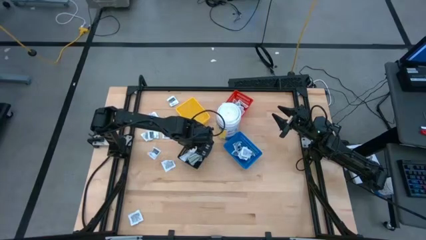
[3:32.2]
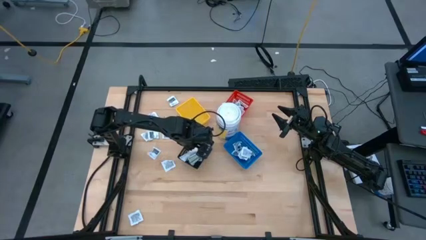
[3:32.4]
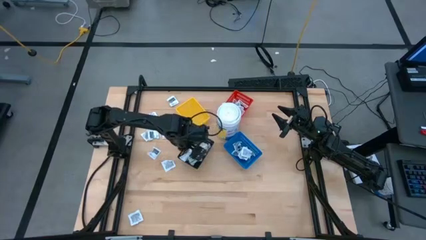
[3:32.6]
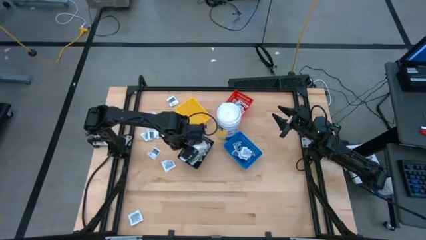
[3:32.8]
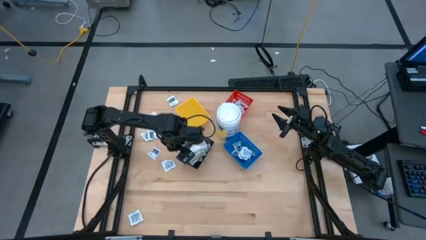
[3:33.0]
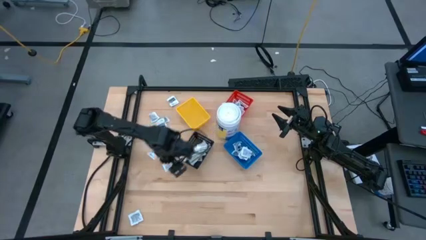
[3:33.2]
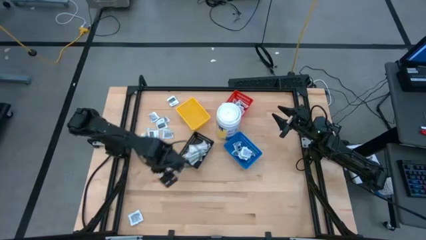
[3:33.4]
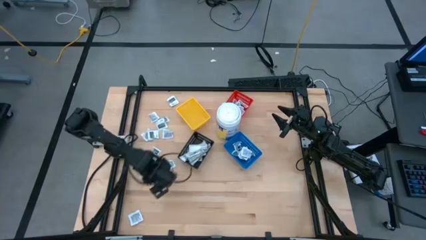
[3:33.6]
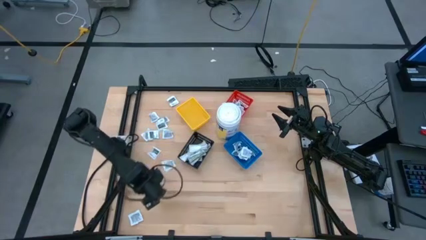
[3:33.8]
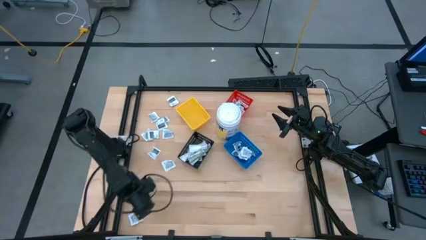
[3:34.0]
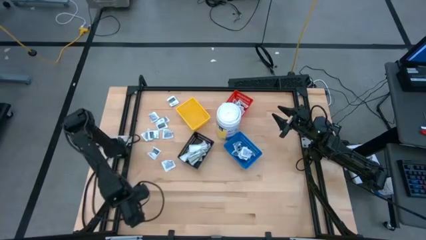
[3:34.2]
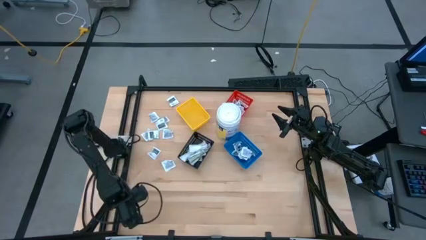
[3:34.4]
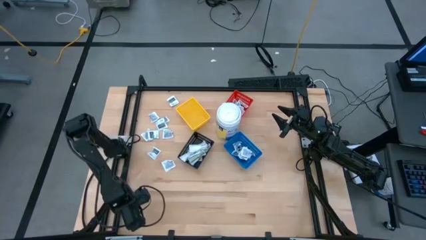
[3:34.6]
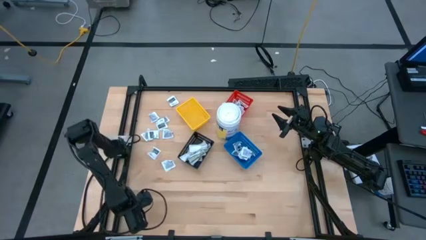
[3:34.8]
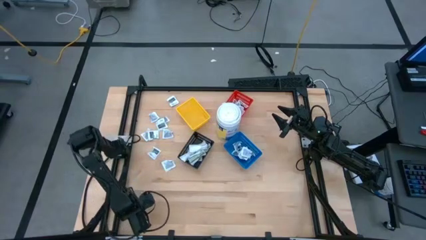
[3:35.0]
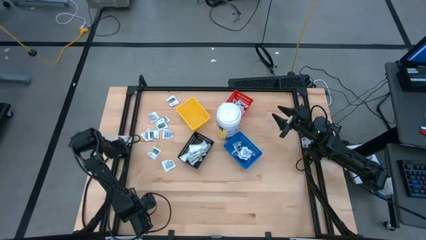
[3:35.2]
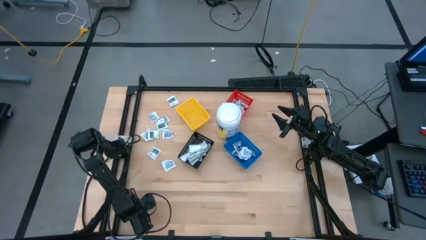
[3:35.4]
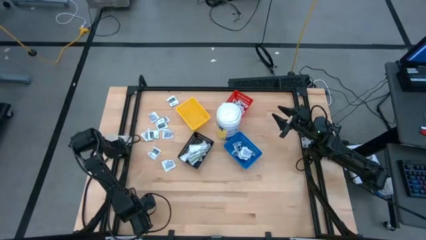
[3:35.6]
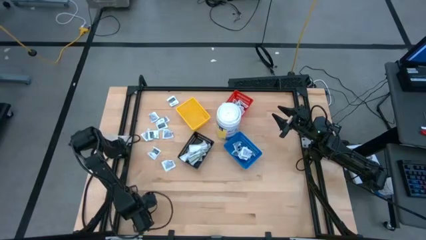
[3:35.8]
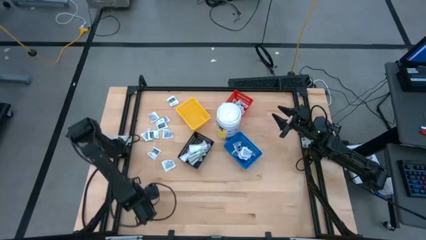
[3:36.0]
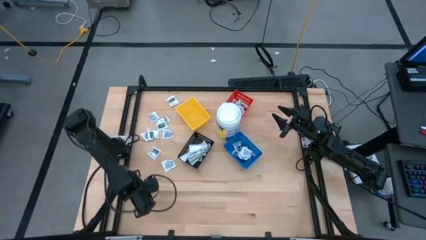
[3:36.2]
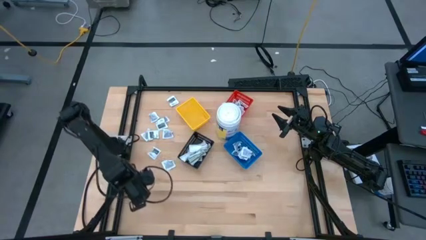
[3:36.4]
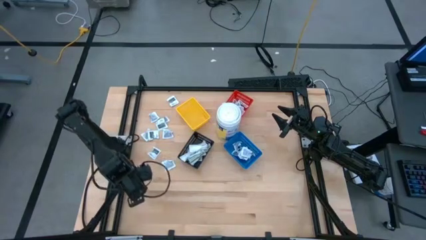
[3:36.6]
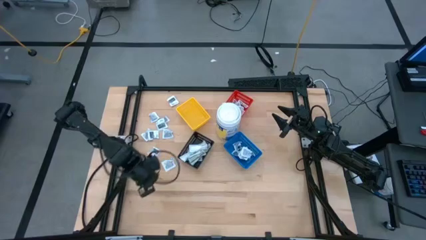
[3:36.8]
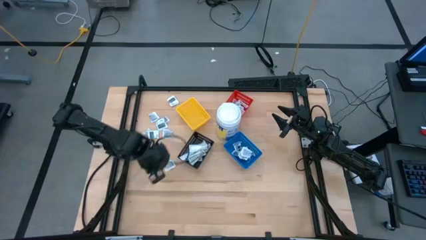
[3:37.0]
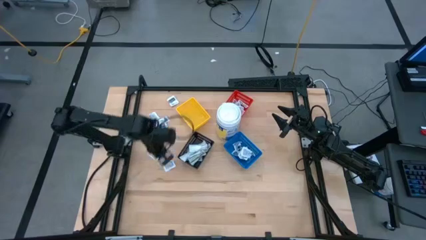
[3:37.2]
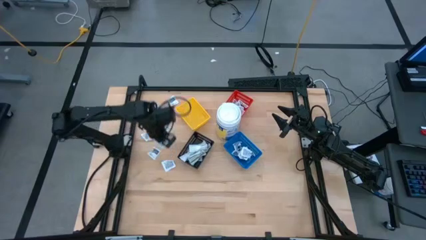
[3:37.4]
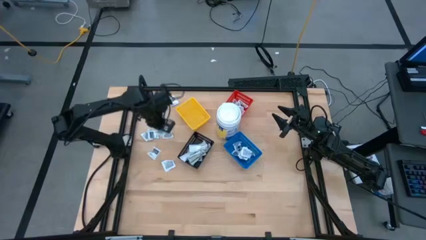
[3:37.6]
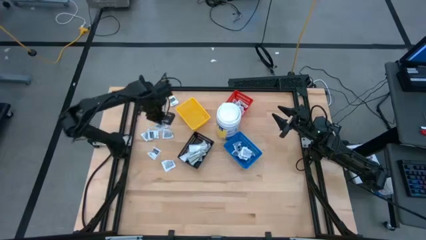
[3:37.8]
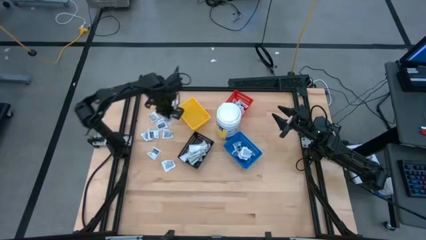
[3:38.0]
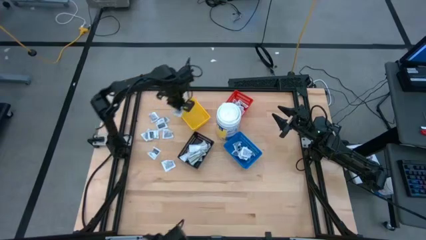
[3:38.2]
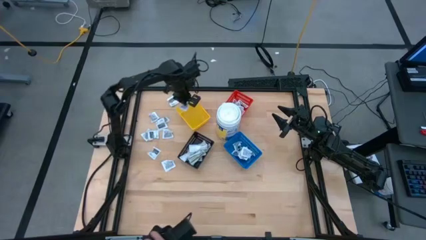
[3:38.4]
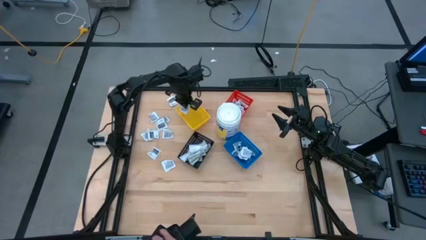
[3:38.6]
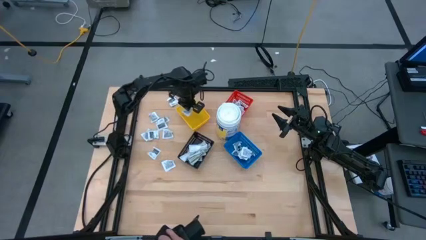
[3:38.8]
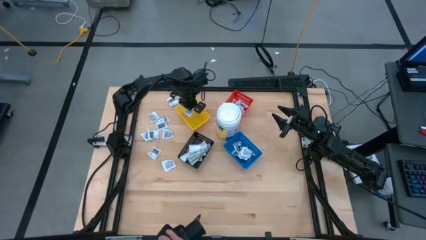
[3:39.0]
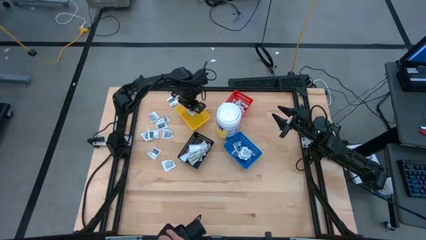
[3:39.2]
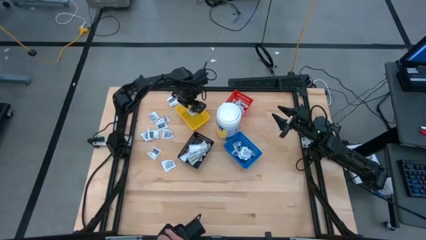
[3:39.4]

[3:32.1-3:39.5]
Task: Pick & Place First Aid Supplies
Put the towelette pack into the yellow bin

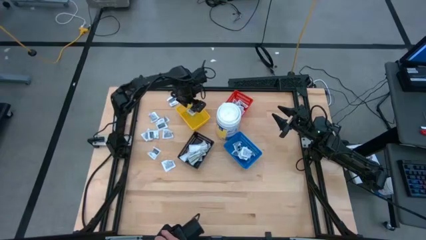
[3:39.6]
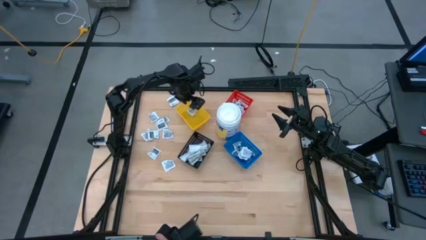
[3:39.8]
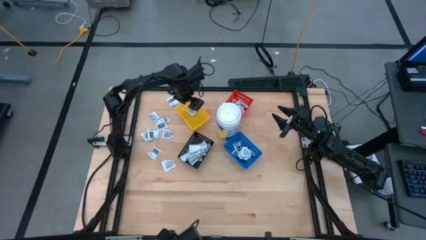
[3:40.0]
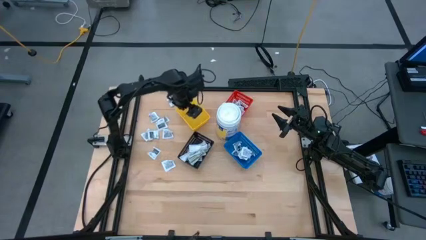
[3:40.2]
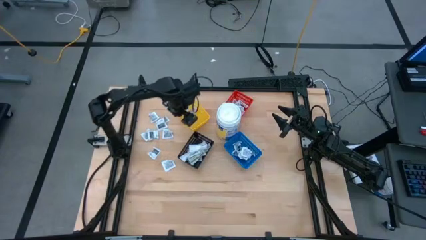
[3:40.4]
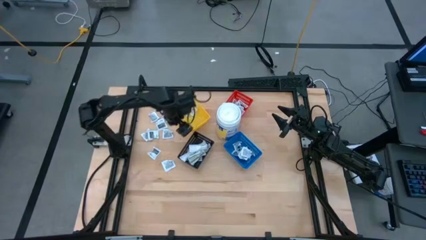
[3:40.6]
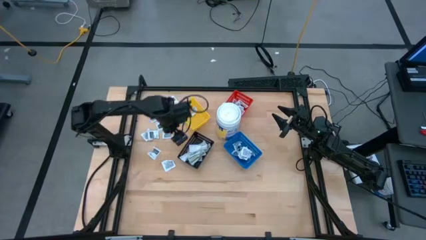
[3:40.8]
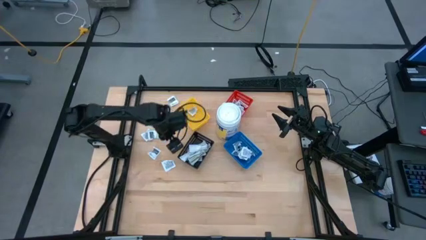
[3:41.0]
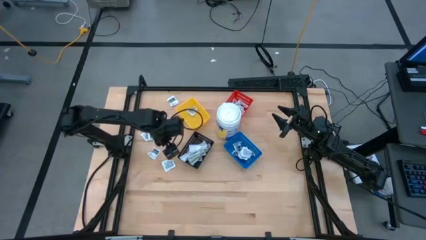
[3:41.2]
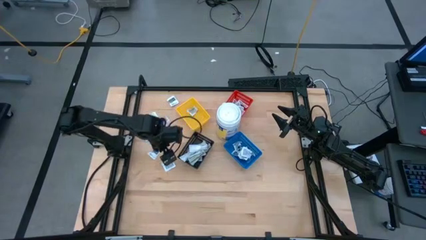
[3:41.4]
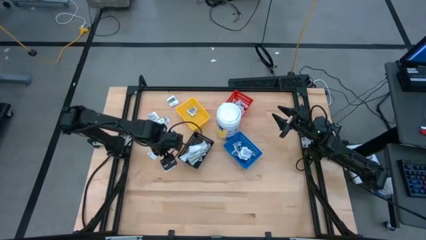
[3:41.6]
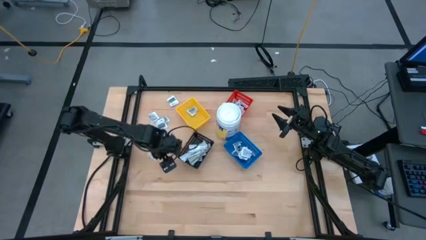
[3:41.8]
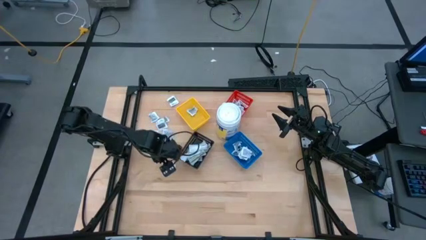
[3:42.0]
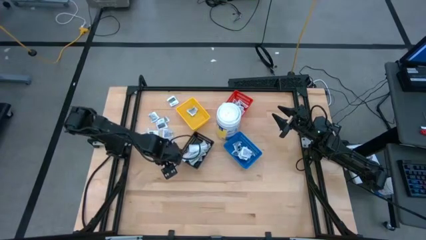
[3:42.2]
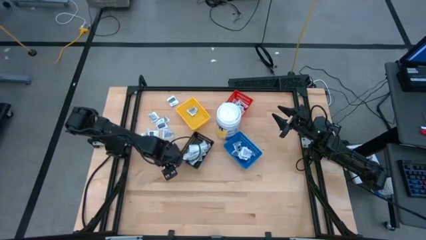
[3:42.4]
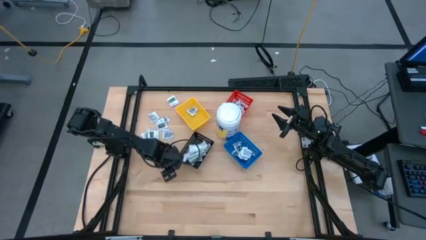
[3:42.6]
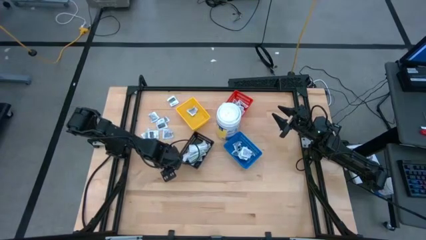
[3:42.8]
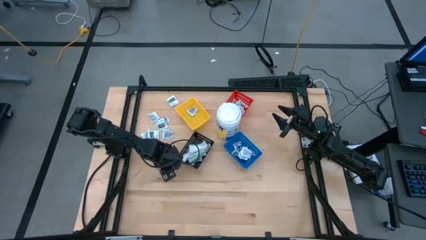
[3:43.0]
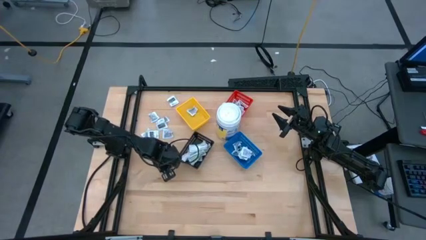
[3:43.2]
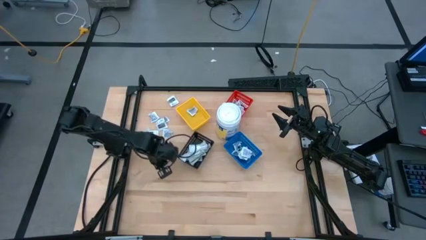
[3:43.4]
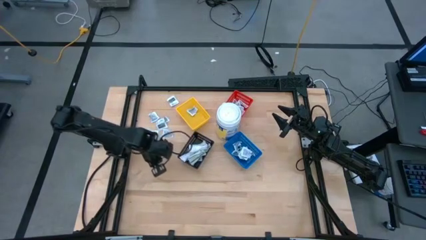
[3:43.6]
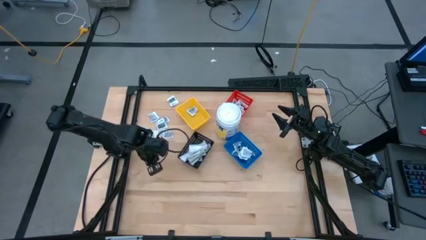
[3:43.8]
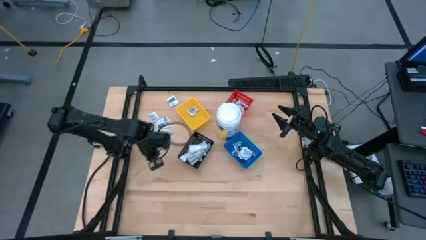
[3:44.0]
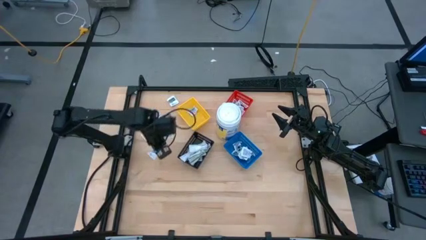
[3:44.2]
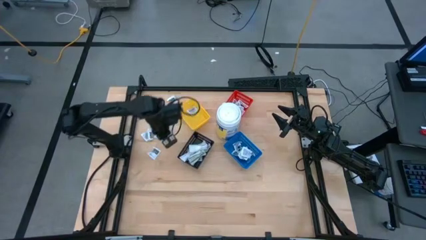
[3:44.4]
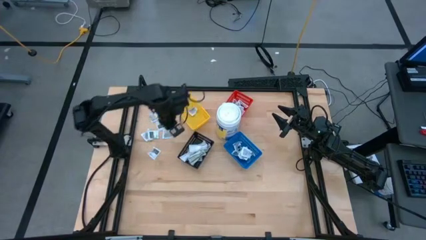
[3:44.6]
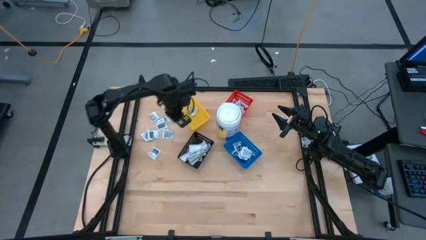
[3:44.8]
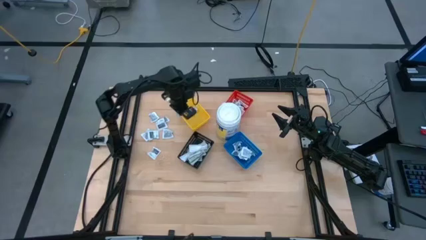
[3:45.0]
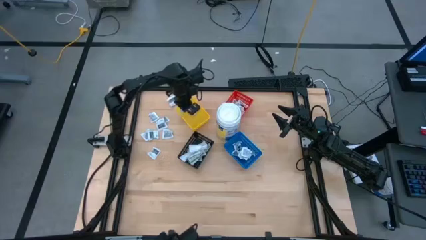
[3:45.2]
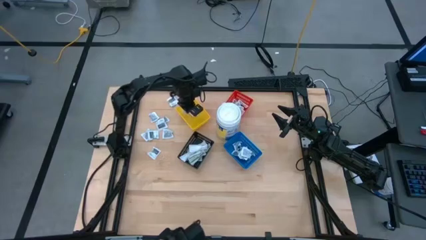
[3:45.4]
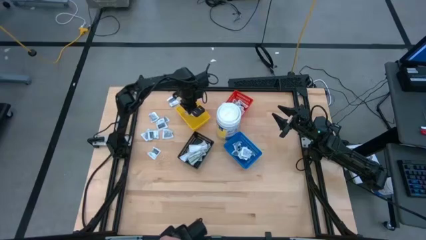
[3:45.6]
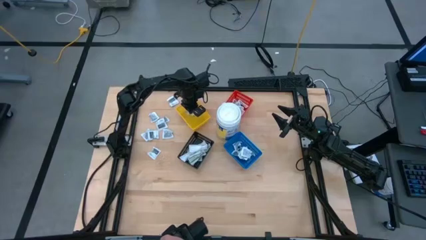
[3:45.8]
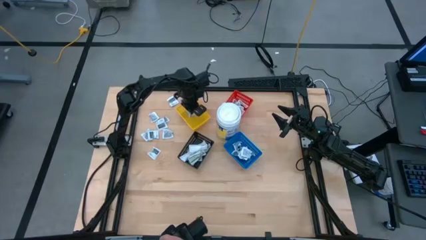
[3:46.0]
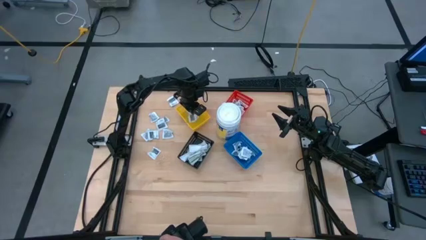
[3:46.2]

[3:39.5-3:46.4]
Put the towelette pack into the yellow bin
